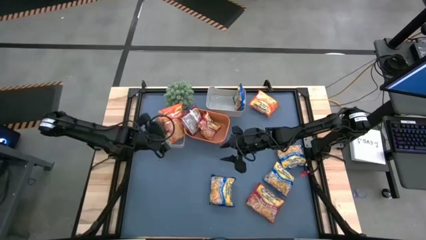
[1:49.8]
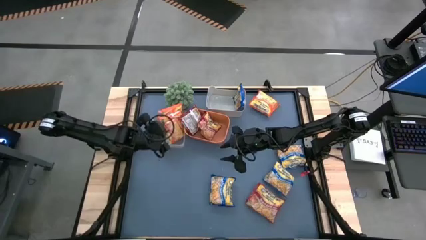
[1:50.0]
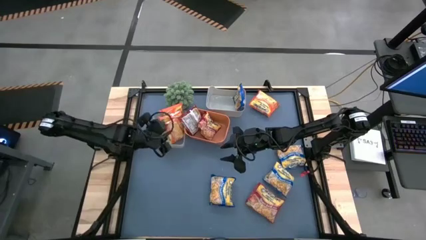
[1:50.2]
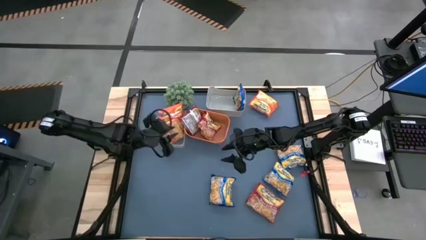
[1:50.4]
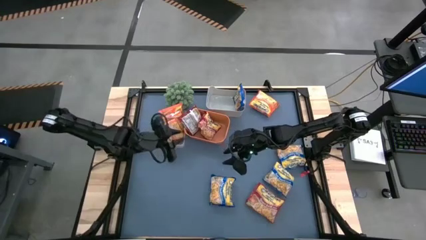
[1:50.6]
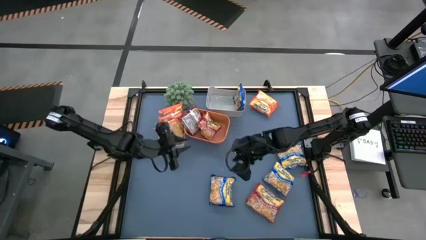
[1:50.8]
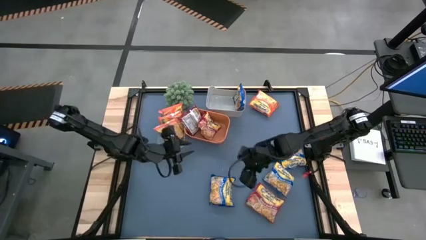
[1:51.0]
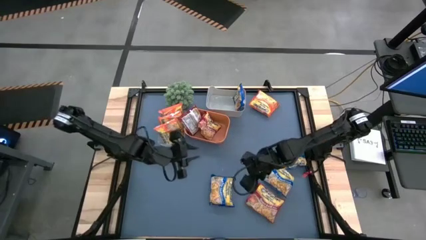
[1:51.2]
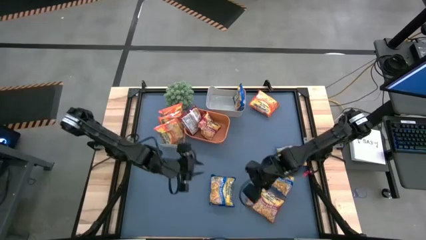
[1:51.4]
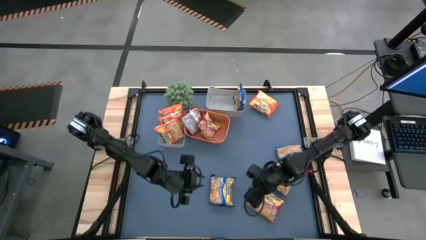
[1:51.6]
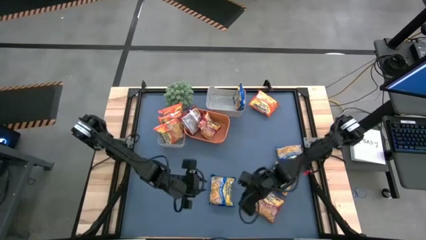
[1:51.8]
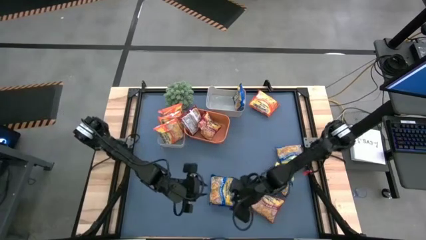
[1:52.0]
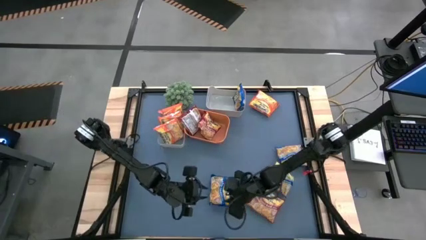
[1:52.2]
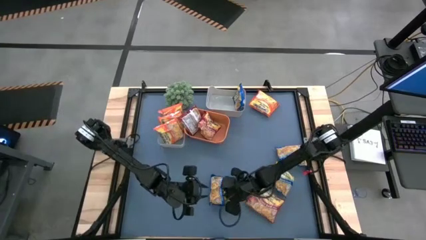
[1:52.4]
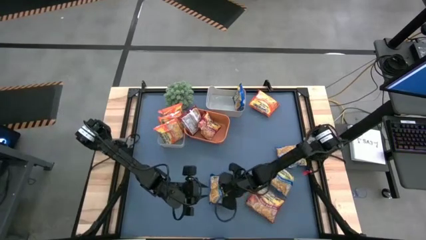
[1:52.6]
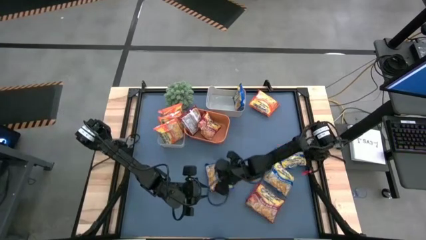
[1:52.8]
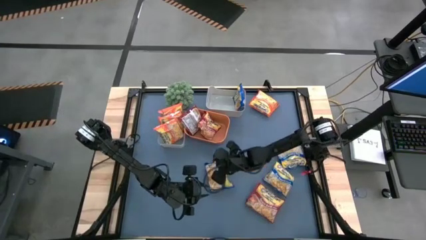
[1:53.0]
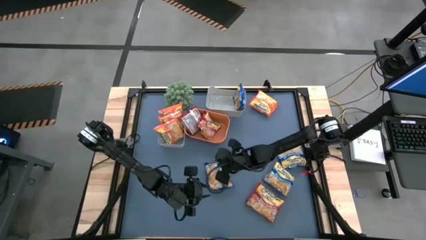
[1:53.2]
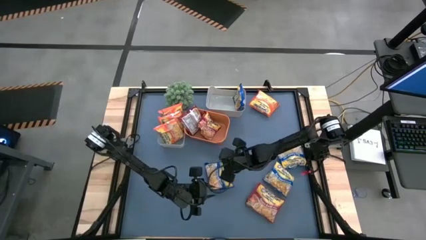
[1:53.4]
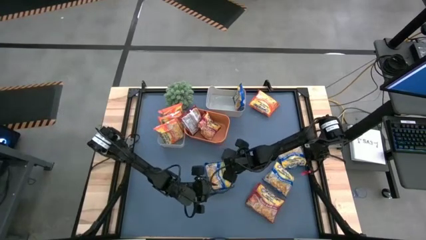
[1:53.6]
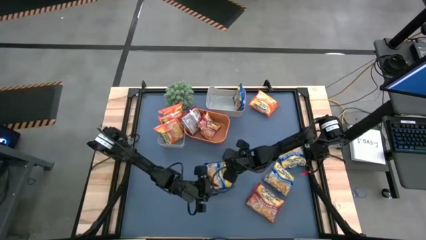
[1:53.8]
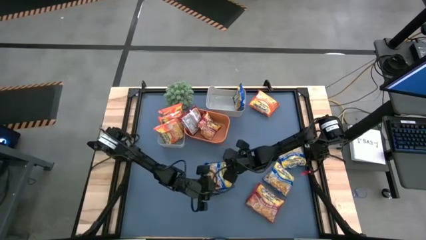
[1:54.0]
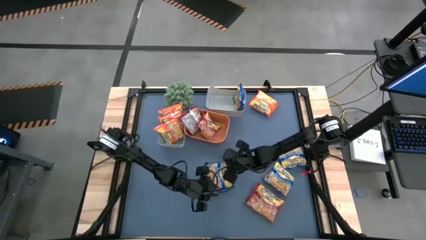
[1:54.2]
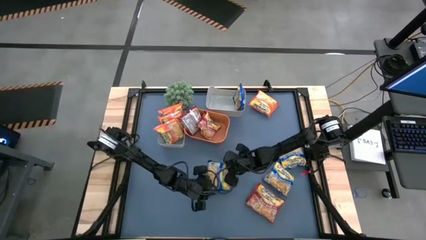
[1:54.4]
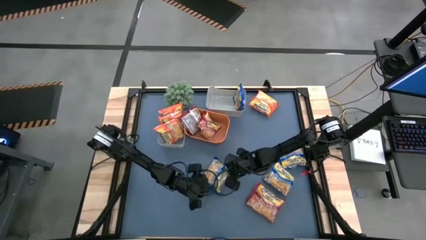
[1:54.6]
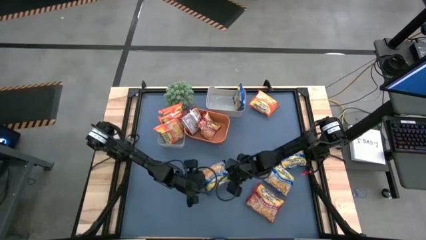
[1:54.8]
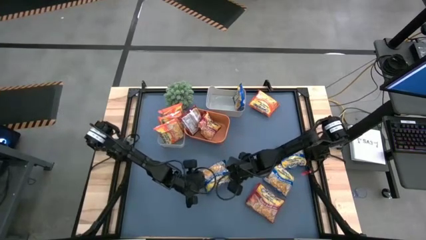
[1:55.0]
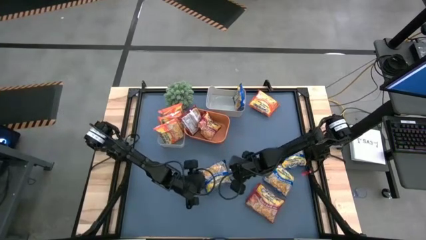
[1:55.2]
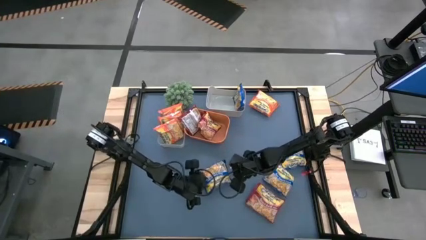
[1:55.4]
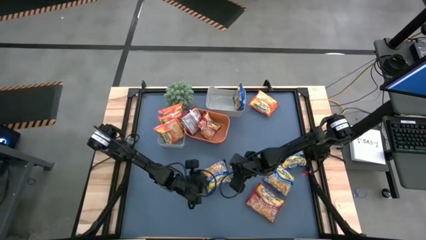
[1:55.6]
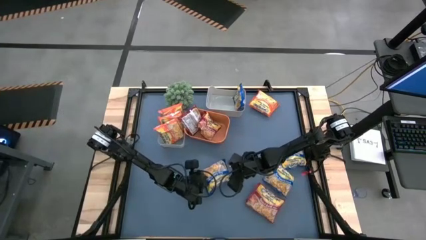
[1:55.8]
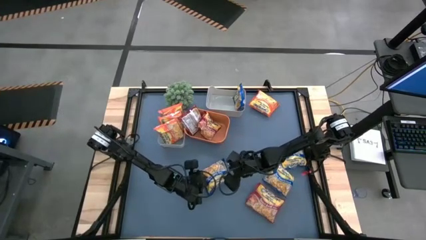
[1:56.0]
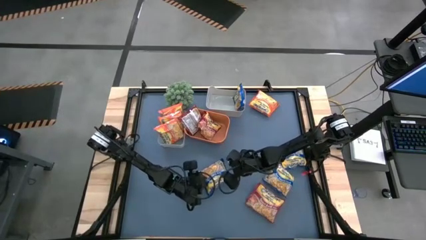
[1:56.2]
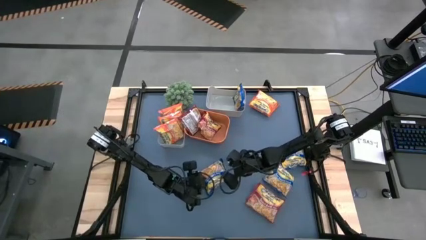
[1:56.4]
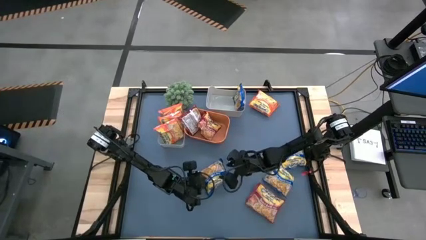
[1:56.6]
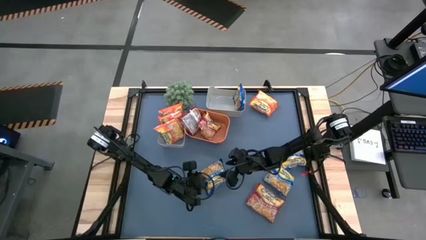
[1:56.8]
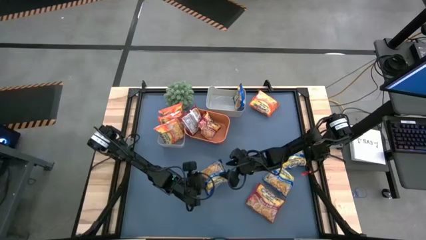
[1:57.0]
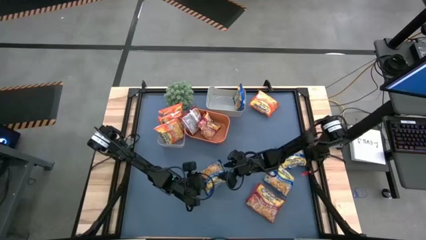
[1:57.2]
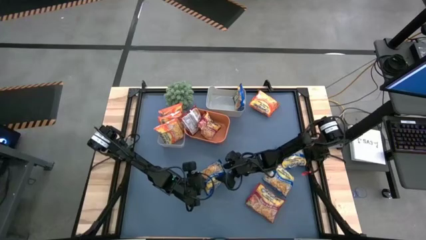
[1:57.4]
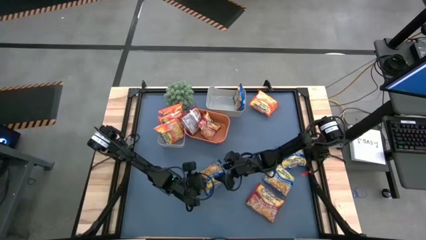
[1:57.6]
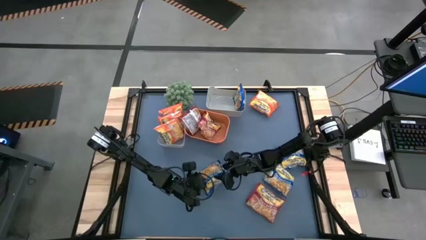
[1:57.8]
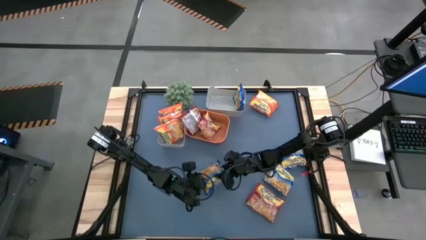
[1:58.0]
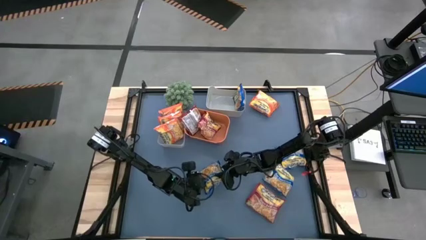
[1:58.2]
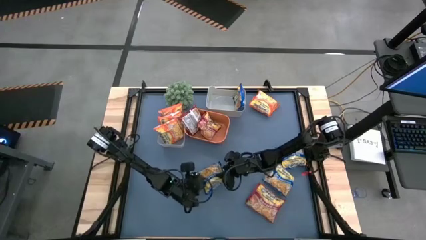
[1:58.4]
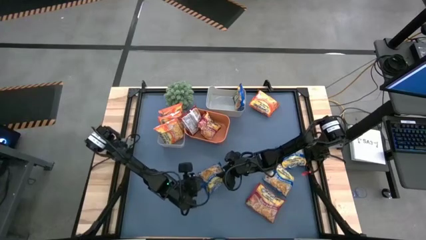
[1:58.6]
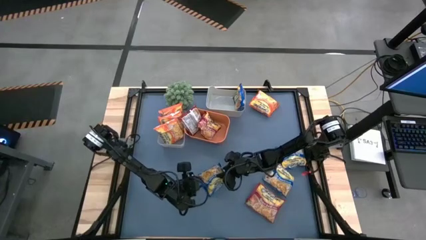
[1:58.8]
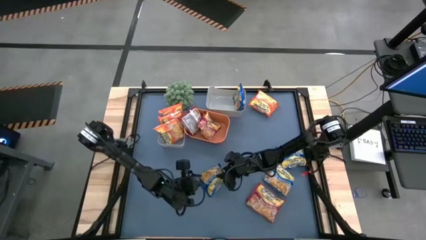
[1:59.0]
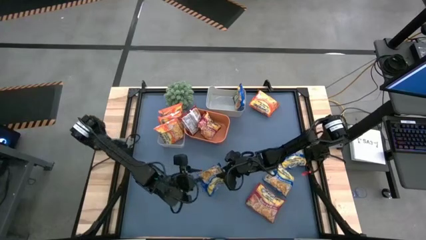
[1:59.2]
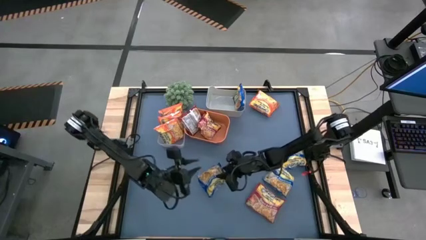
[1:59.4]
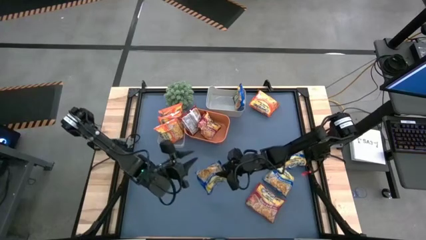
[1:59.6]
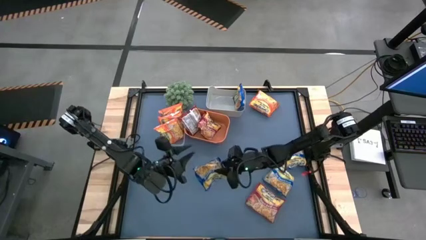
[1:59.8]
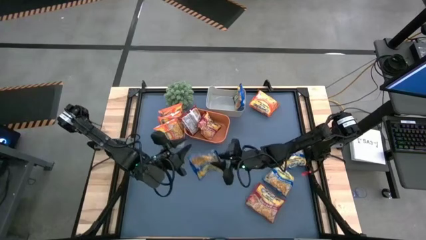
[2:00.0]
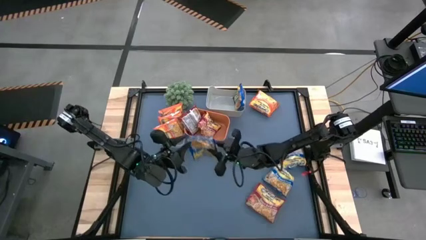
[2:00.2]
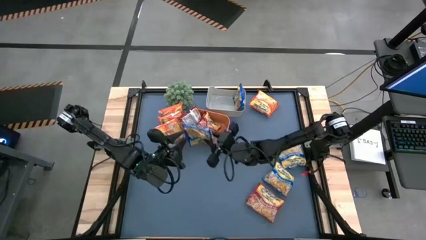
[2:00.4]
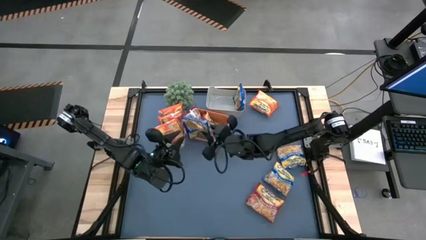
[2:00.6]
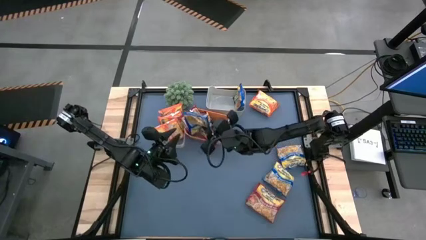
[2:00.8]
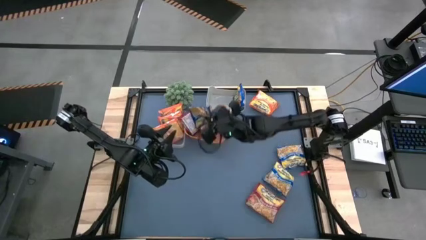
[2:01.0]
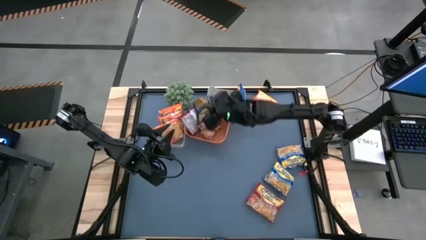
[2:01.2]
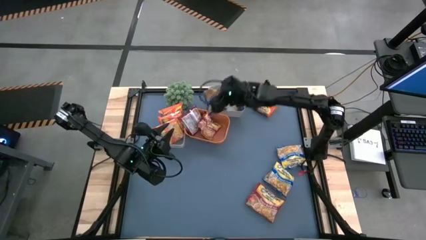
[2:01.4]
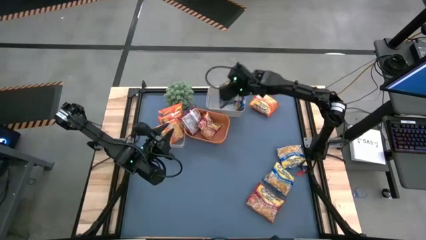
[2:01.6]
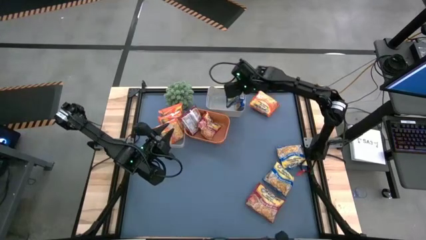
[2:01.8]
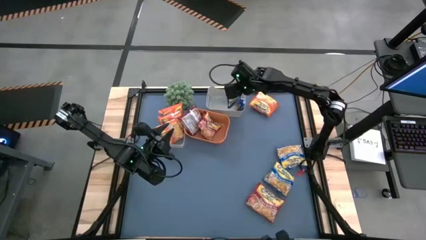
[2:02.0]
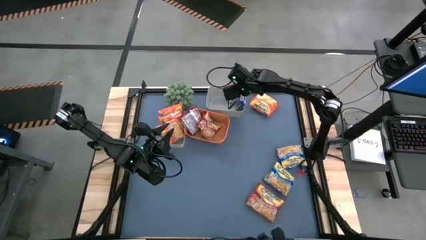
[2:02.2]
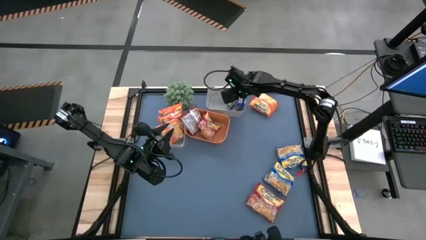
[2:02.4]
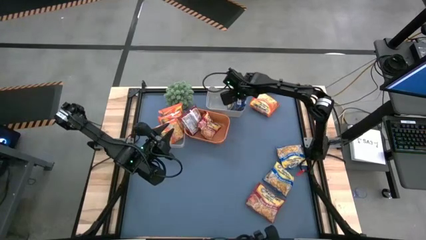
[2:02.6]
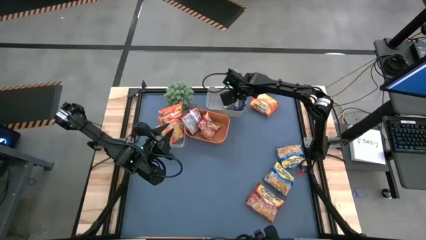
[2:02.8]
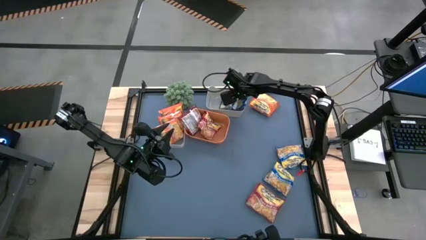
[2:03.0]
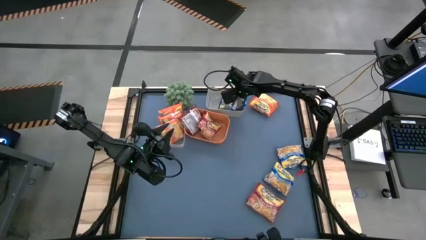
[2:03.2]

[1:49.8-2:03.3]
Task: Sort Maruchan noodles
Put the blue noodle pack into the gray bin

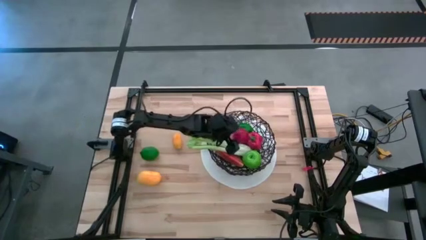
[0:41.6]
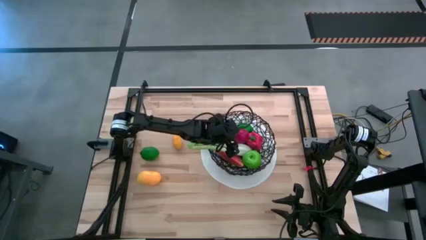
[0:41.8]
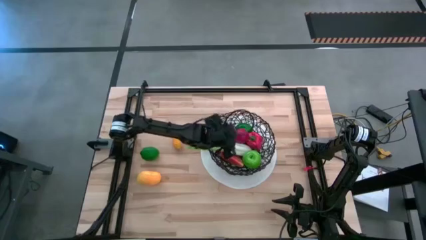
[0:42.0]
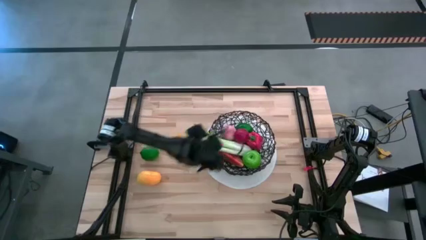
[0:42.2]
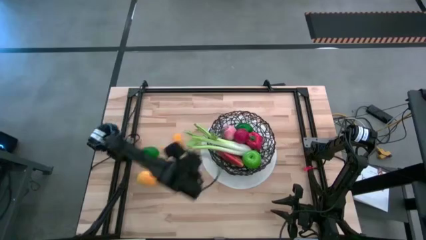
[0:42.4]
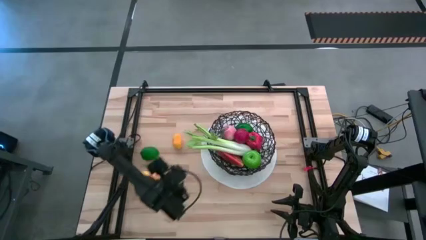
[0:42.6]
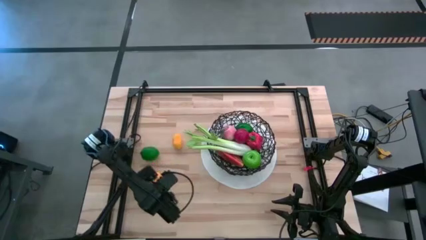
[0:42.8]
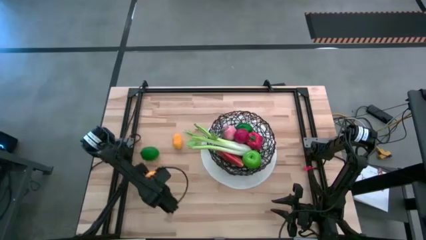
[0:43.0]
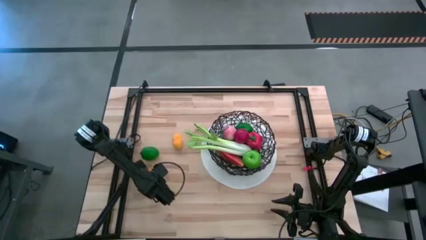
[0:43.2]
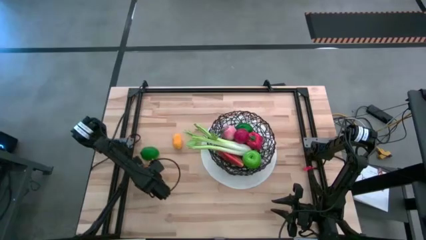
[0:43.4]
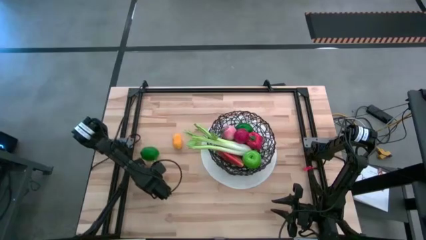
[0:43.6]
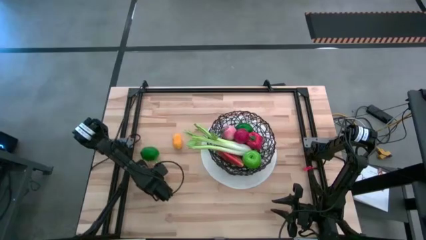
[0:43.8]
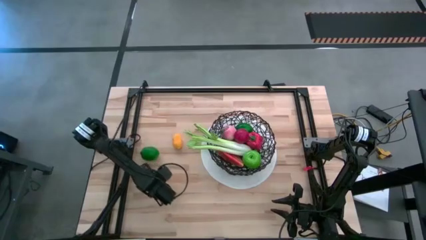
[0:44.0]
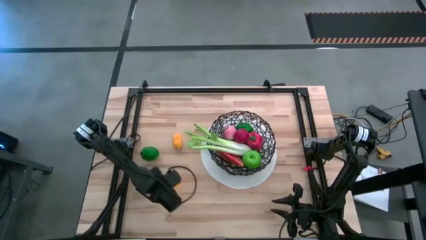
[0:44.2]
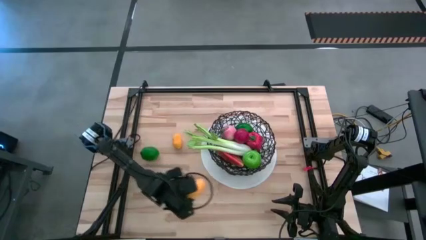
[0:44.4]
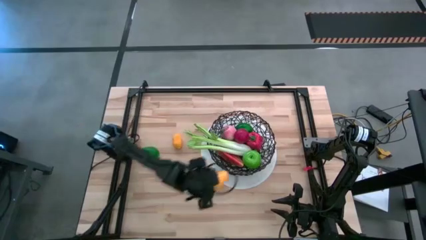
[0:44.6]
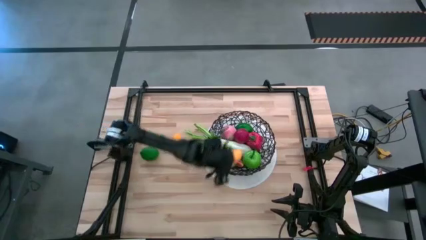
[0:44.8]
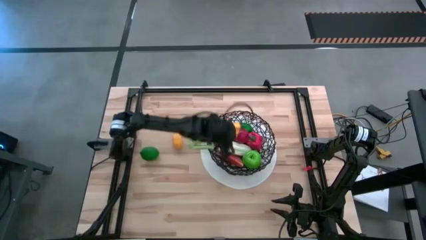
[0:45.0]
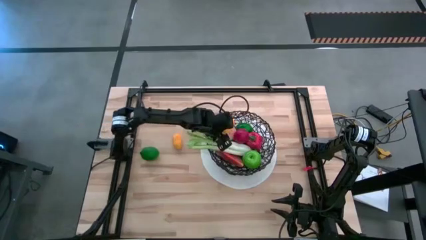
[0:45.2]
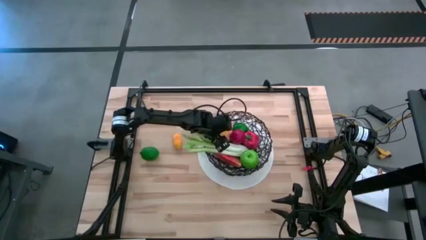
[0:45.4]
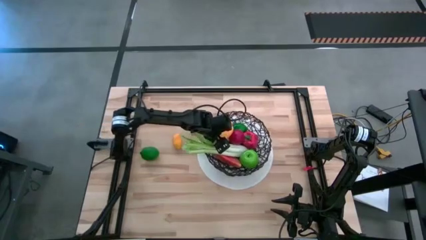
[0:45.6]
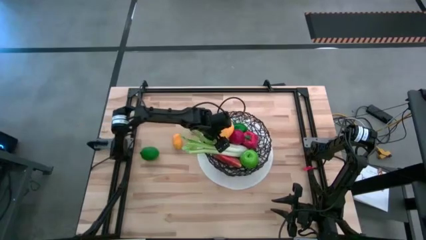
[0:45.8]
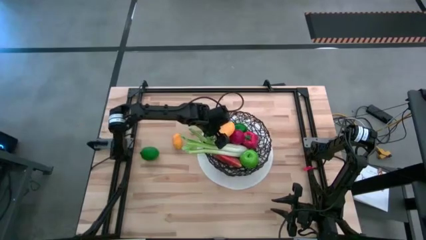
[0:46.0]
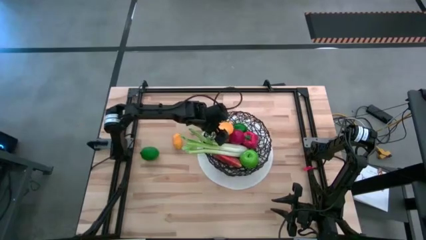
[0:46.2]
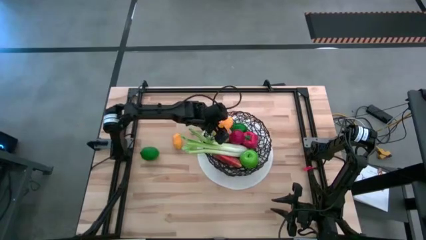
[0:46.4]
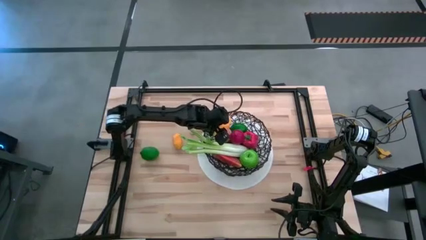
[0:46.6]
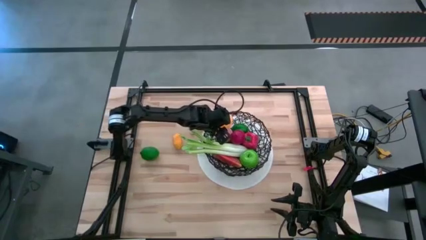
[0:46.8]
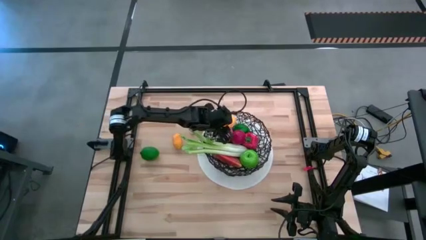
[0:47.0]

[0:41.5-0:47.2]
Task: Build produce basket
Put the yellow mango into the wire basket
